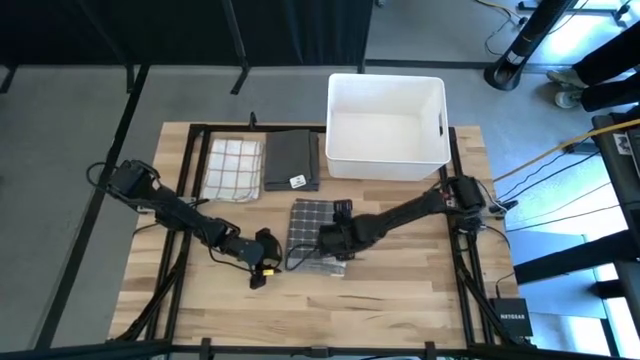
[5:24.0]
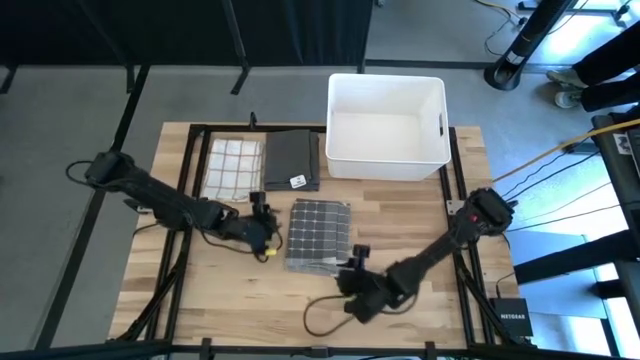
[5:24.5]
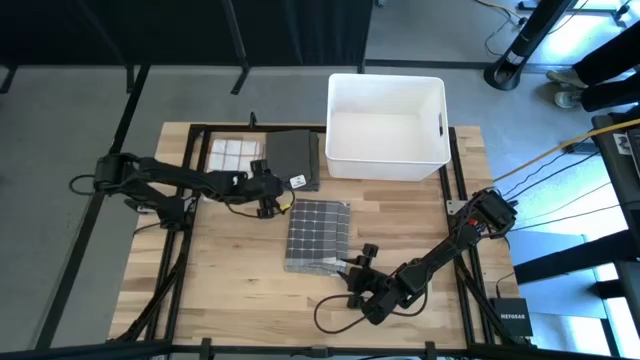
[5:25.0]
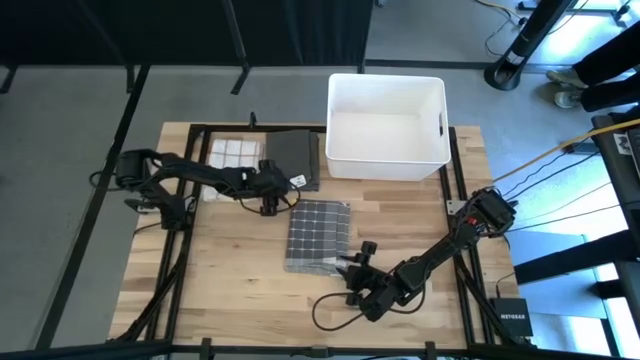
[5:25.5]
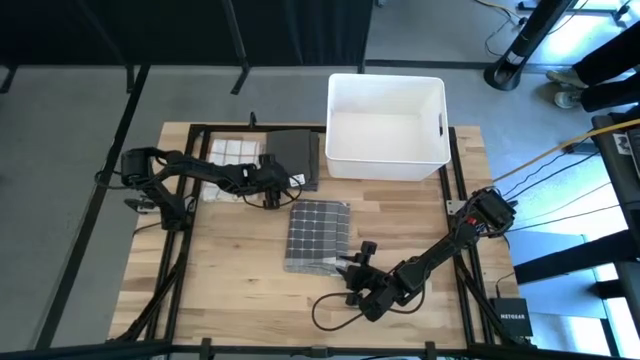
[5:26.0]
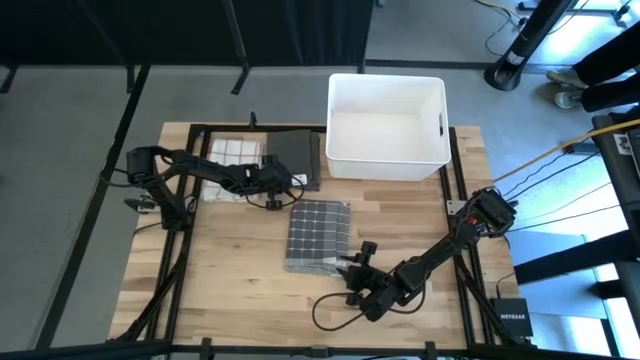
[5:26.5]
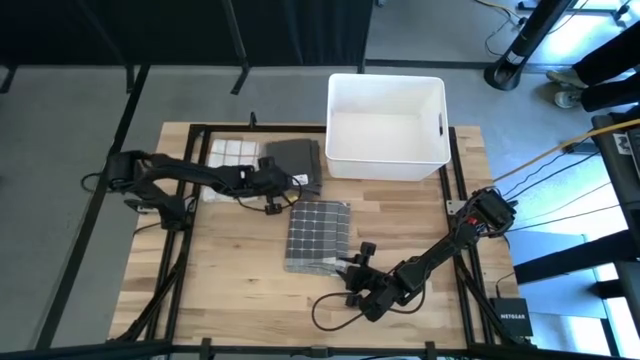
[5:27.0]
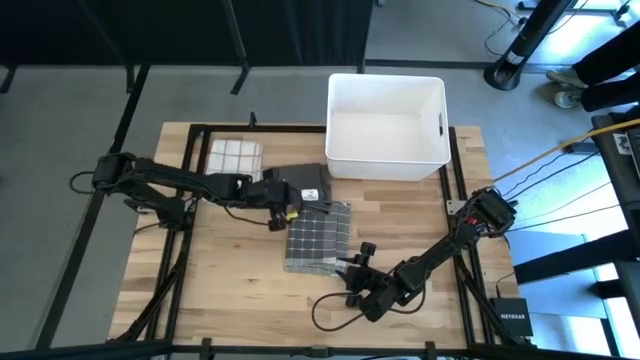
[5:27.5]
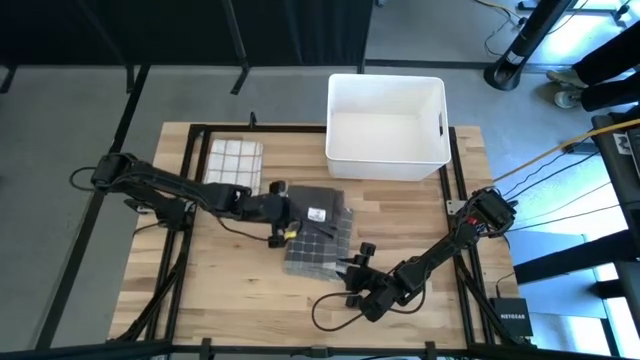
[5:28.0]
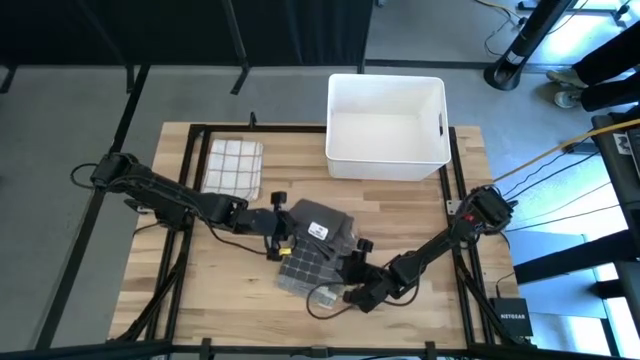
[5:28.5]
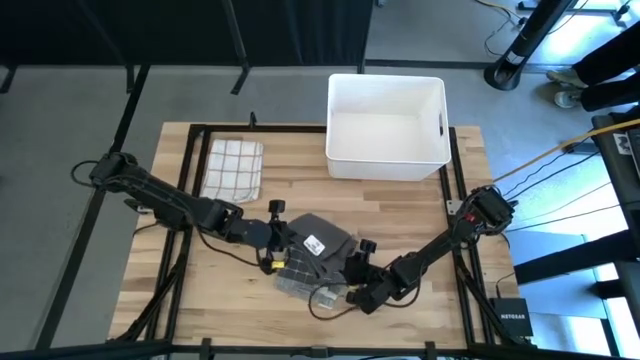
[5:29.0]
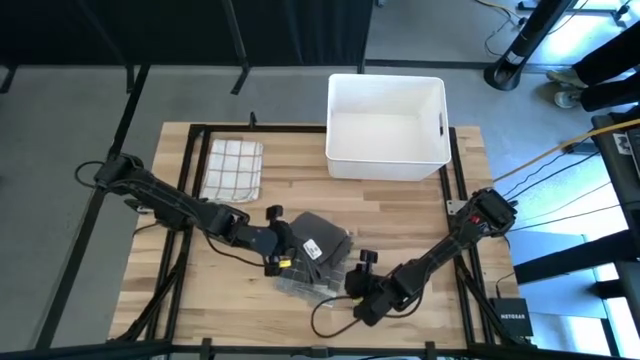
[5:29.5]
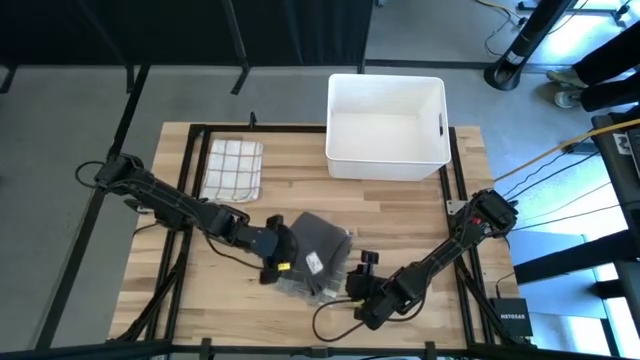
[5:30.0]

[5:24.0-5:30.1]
Task: Fold towel
Stack the gray towel on top of the gray patterned towel

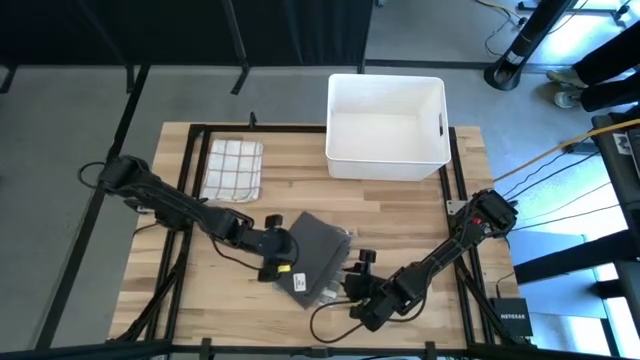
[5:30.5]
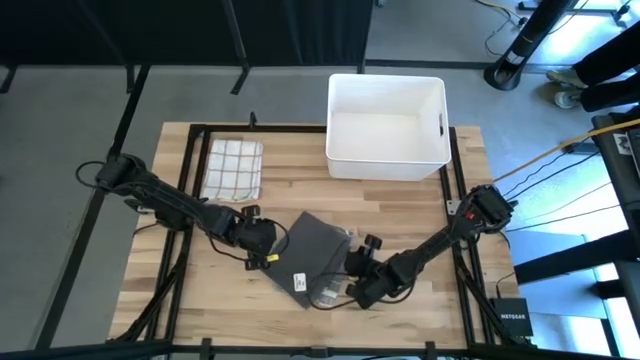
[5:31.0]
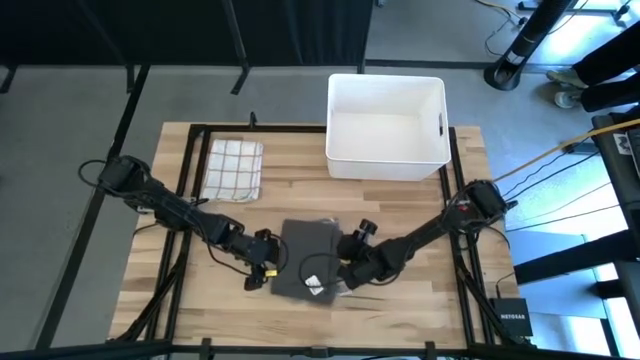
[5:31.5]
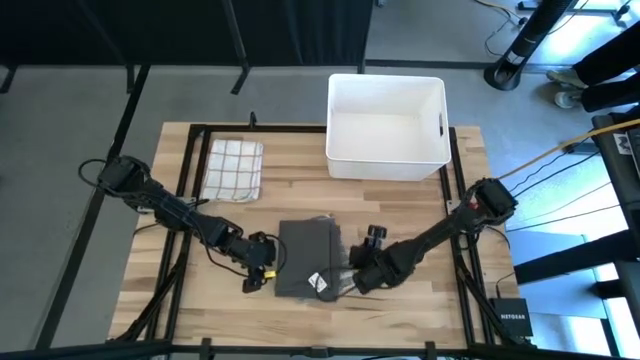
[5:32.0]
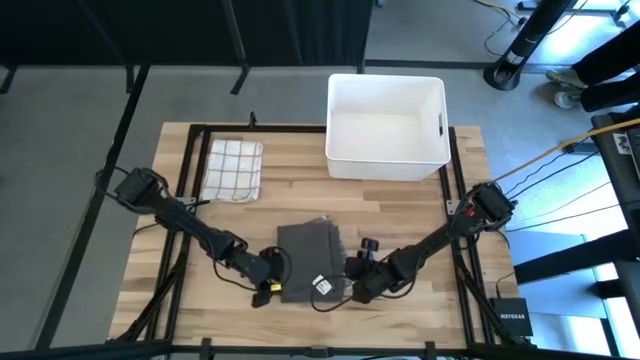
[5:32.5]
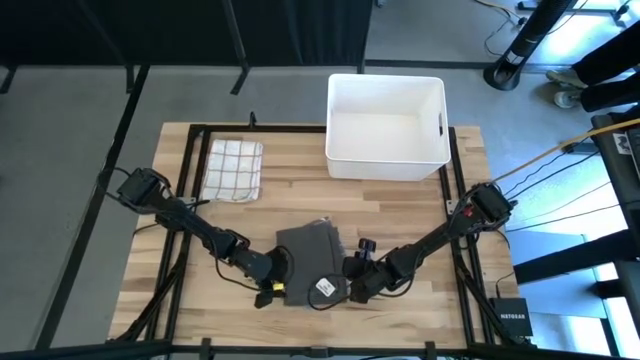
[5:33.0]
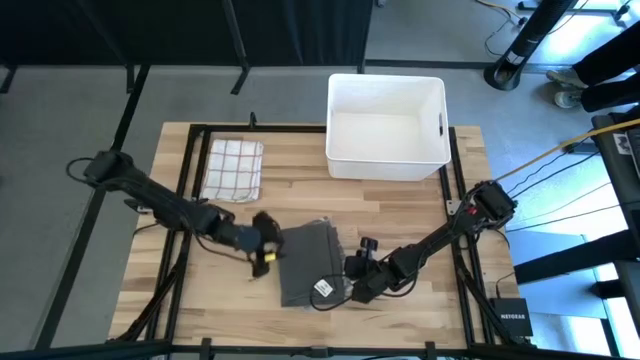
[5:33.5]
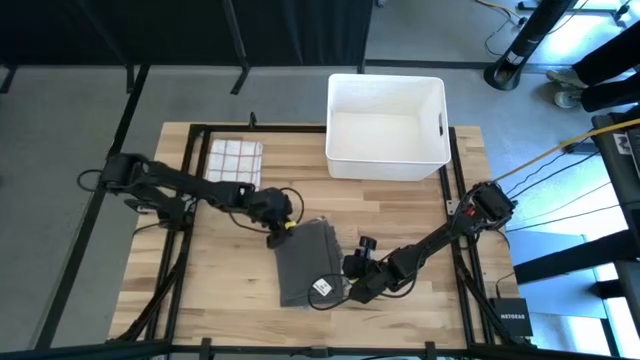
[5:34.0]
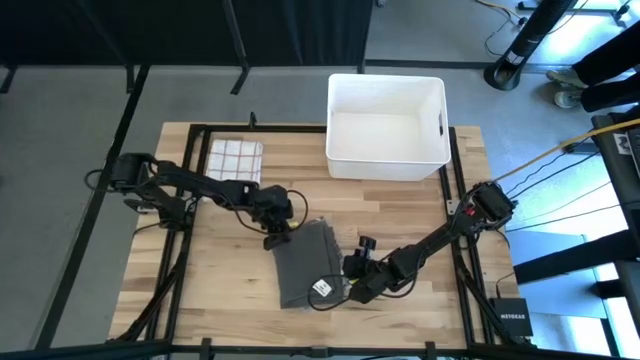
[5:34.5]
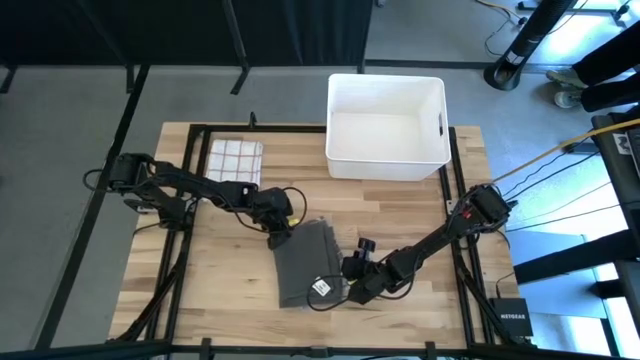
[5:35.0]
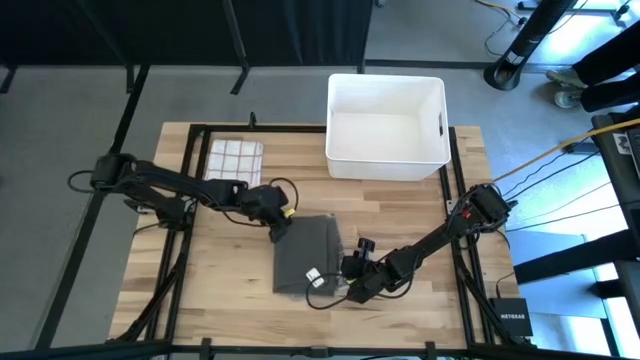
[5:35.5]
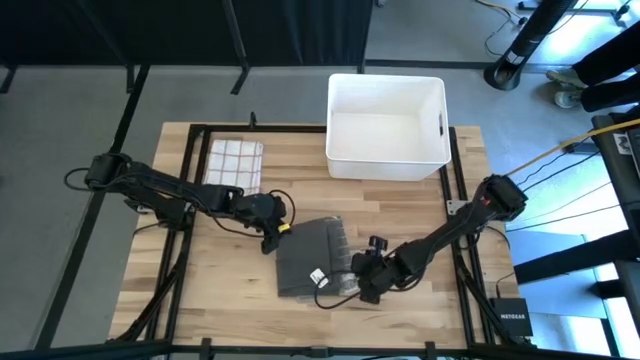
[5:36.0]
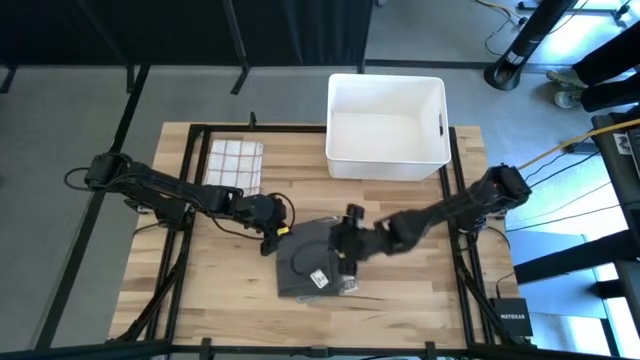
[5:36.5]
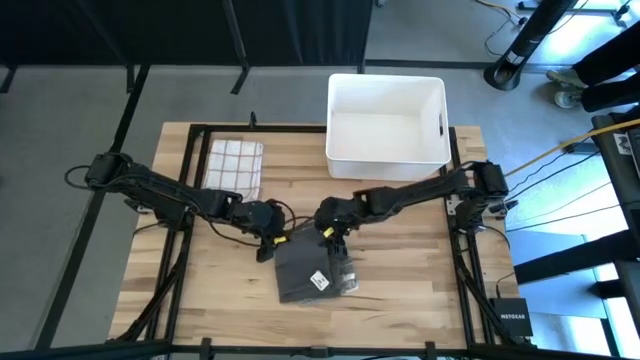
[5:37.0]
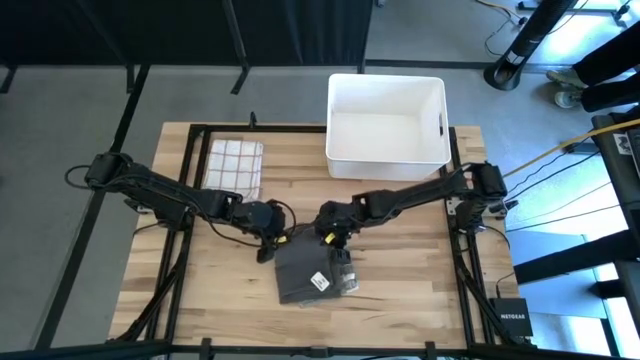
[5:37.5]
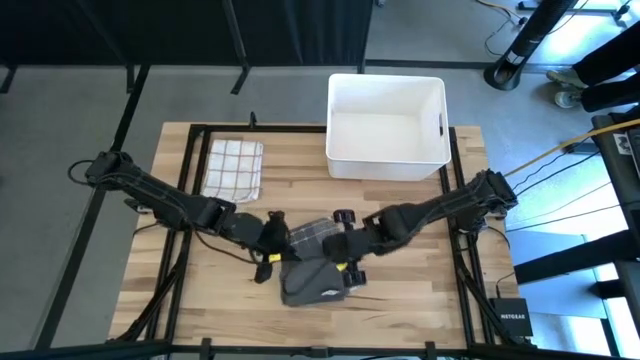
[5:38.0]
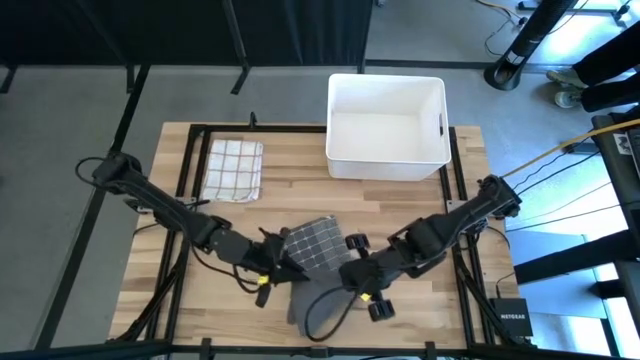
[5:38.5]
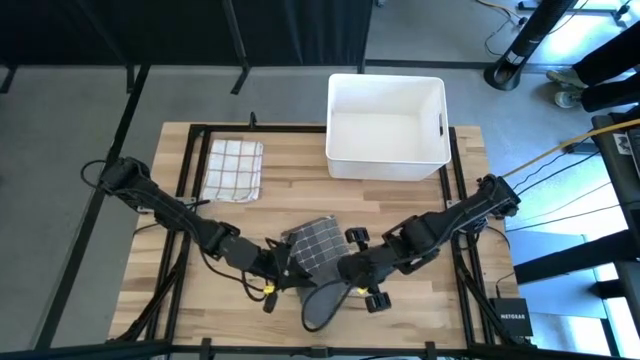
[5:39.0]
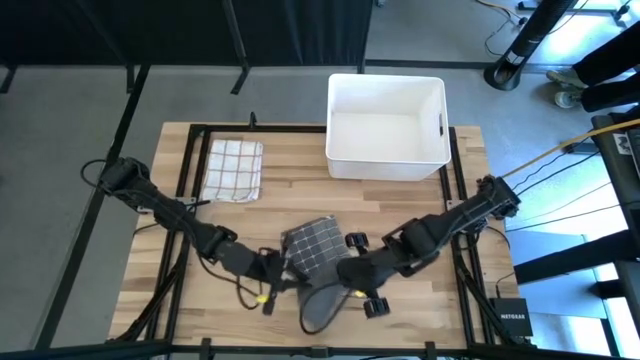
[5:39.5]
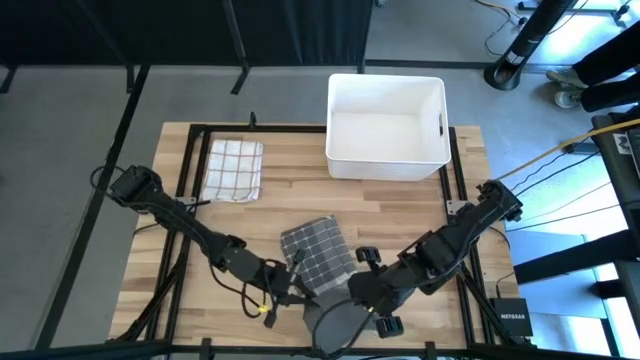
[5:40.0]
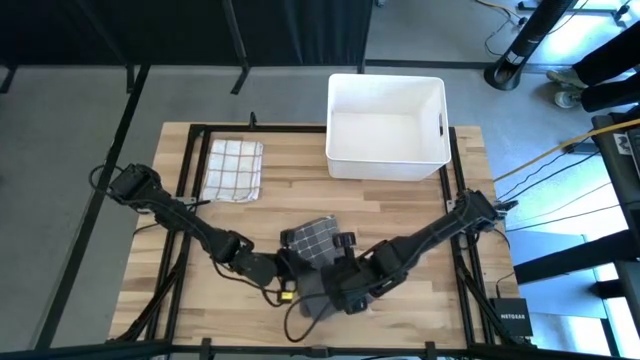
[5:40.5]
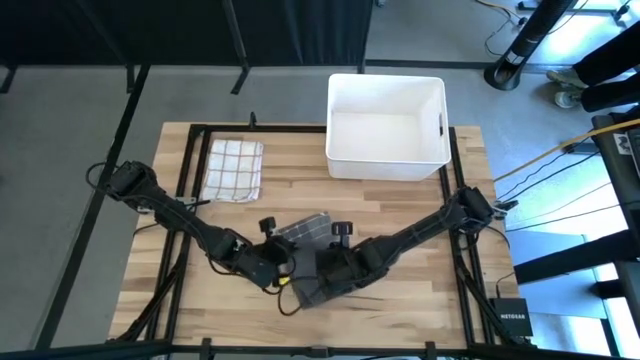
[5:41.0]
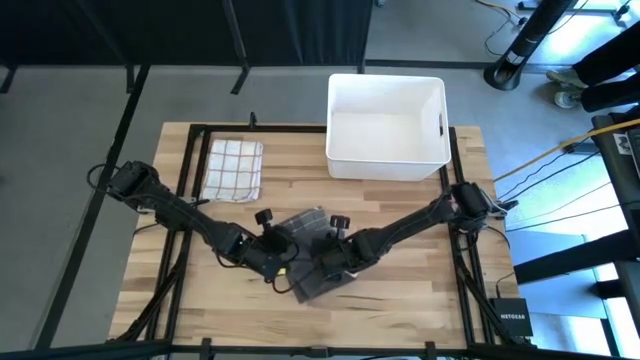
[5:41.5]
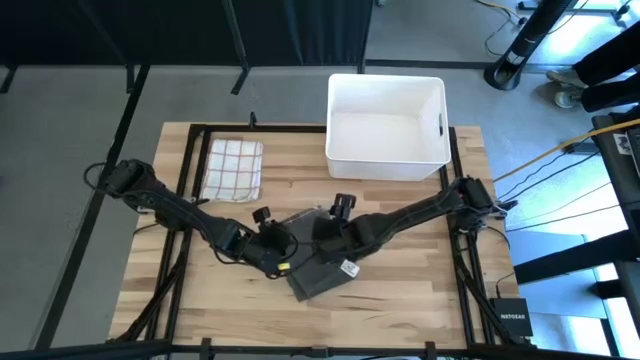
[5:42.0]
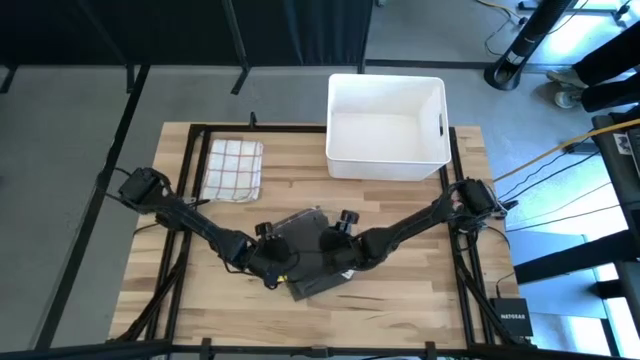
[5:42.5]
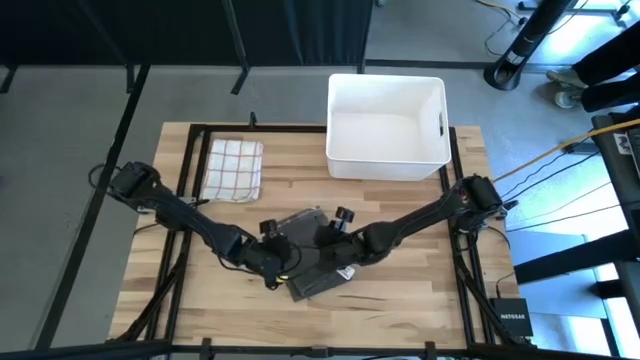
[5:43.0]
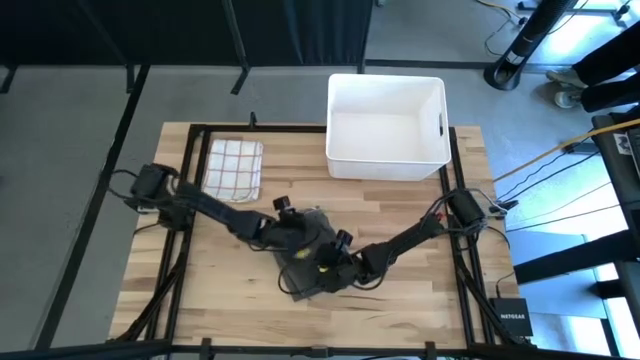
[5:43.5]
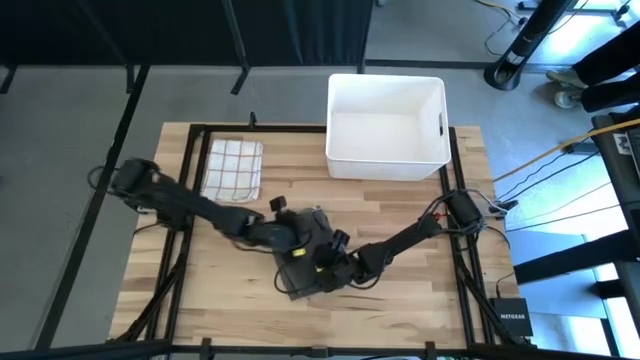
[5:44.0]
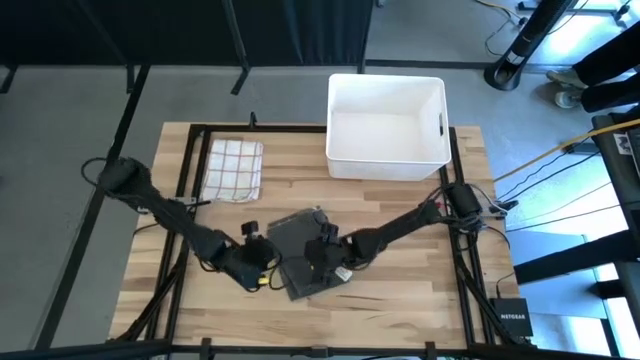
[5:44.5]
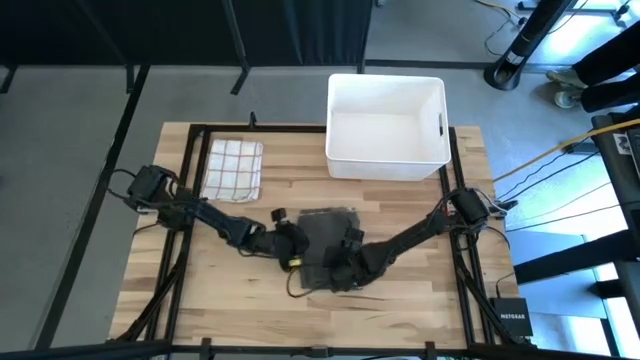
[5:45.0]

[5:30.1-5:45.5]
Adjust the stacked towels
